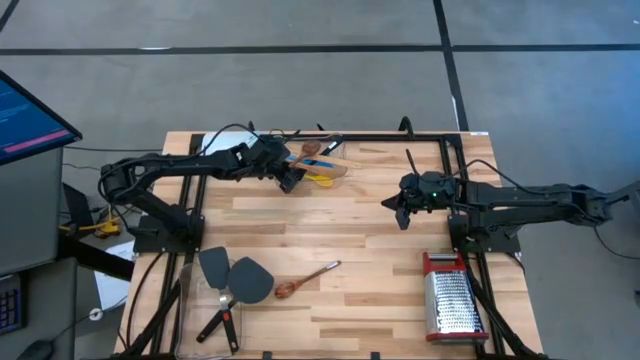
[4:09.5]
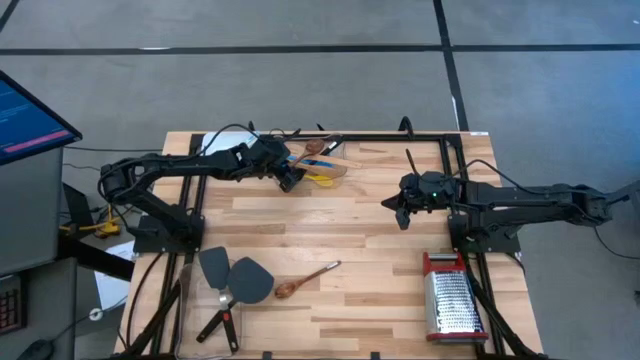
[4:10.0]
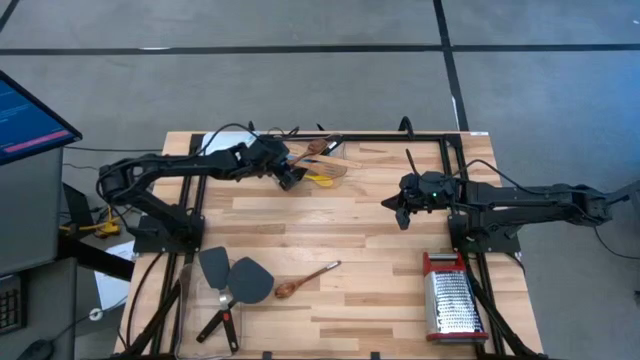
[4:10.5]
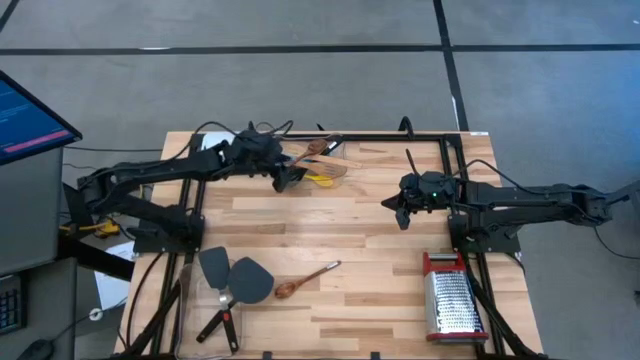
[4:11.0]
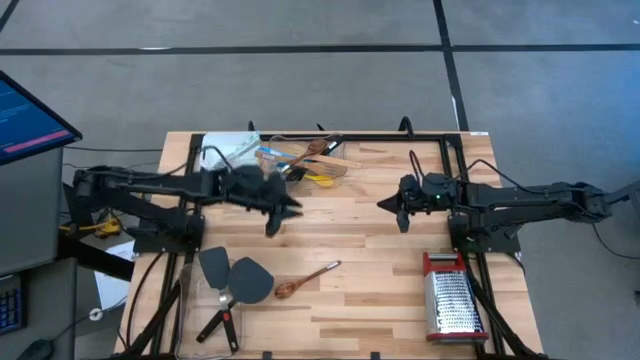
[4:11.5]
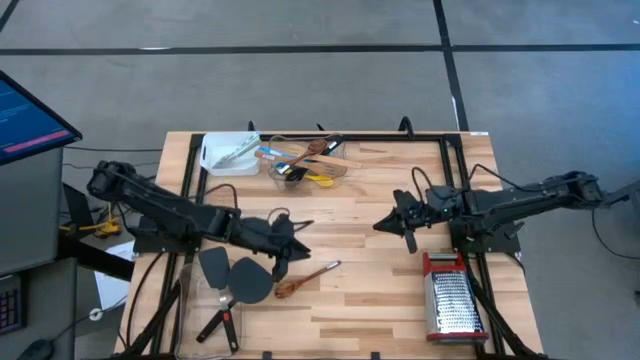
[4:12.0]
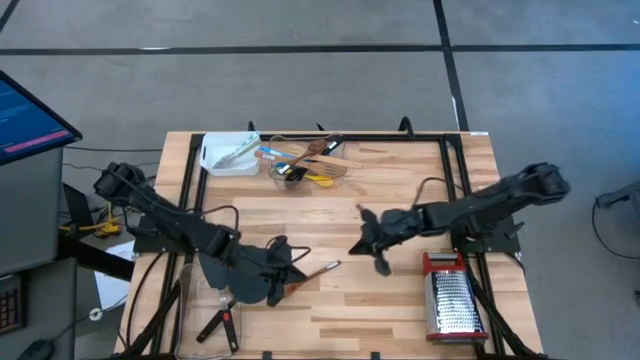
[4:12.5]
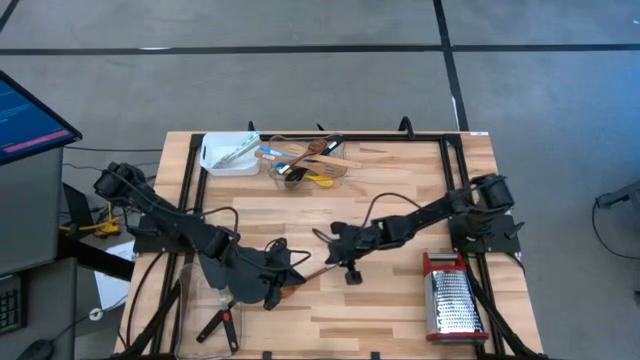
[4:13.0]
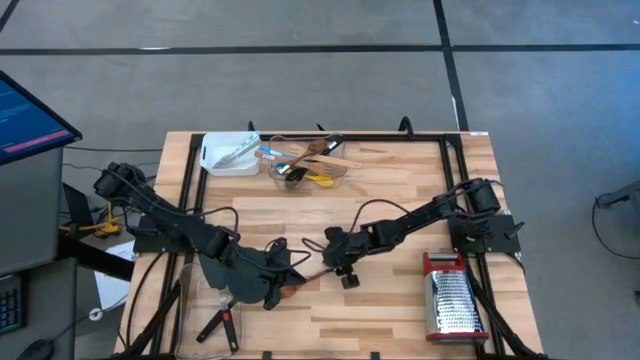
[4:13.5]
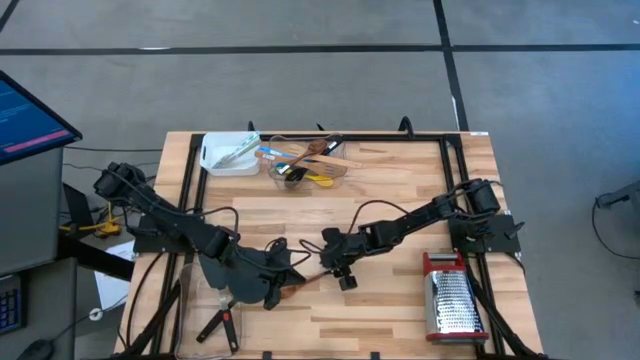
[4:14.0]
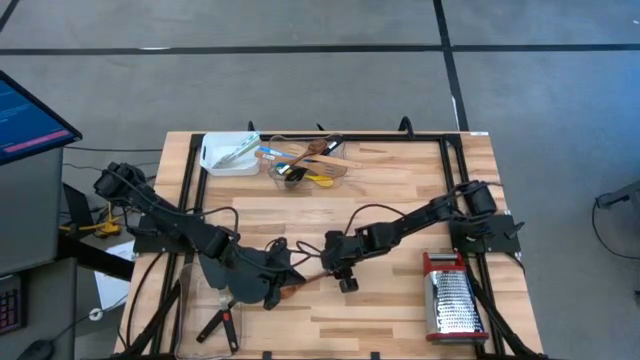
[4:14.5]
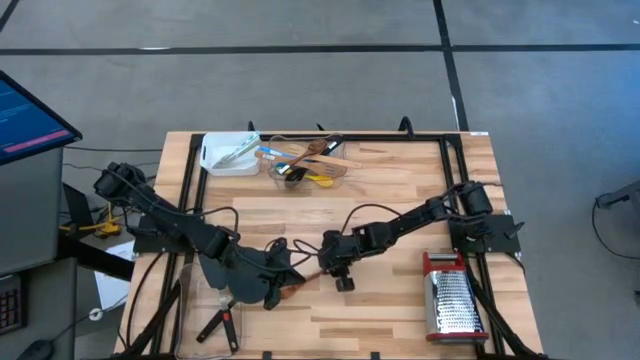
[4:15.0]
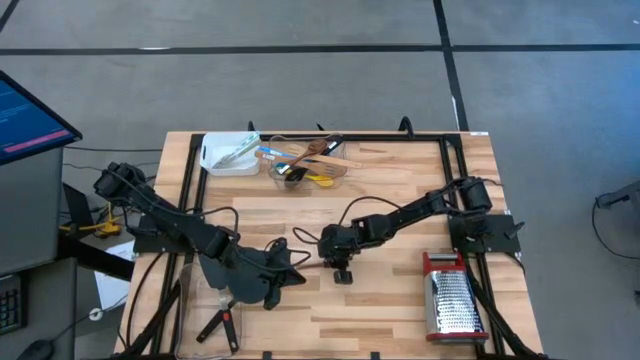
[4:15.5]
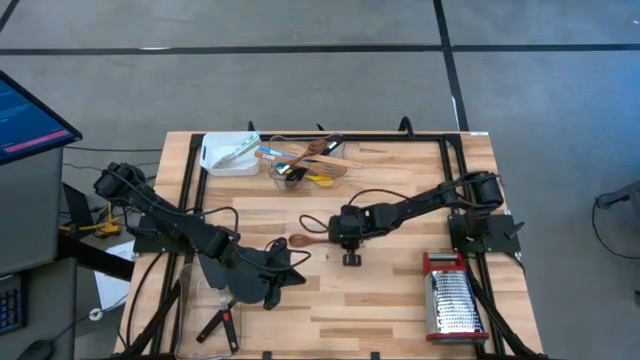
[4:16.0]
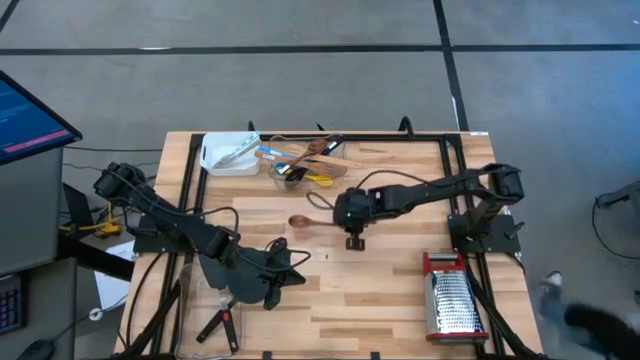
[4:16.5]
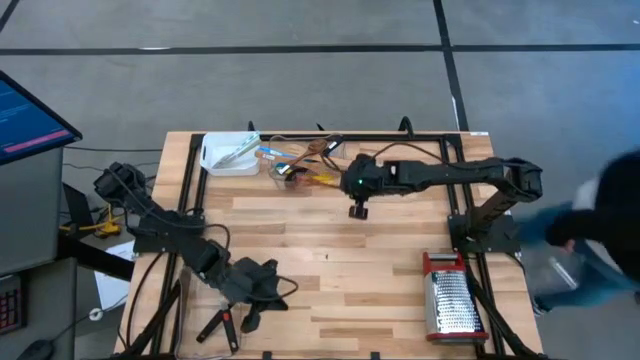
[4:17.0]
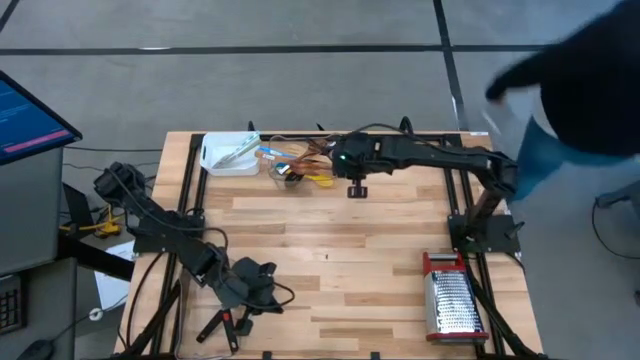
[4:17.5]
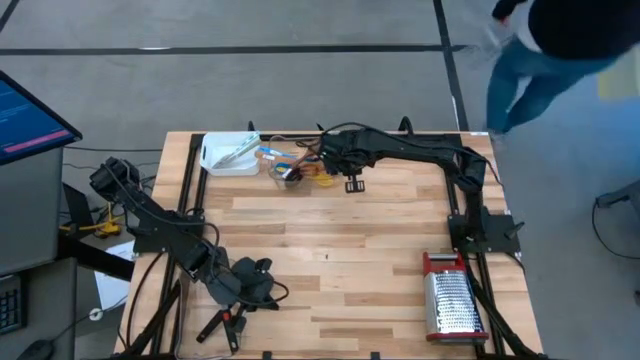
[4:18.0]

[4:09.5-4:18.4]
Task: Pick & Place Kitchen Items
Put the brown serving spoon into the top transparent bin

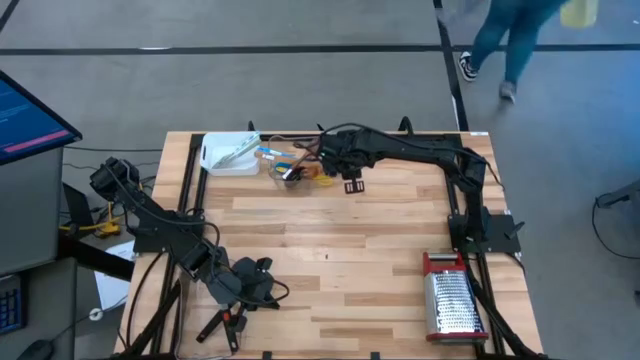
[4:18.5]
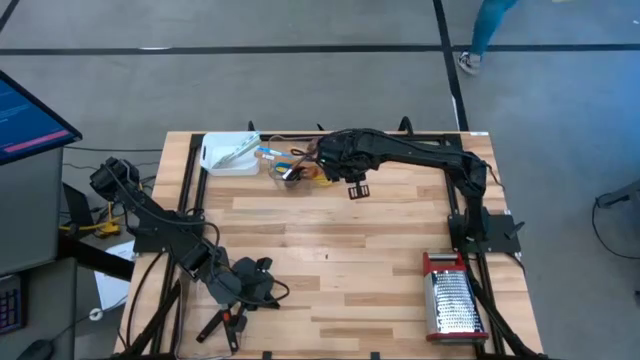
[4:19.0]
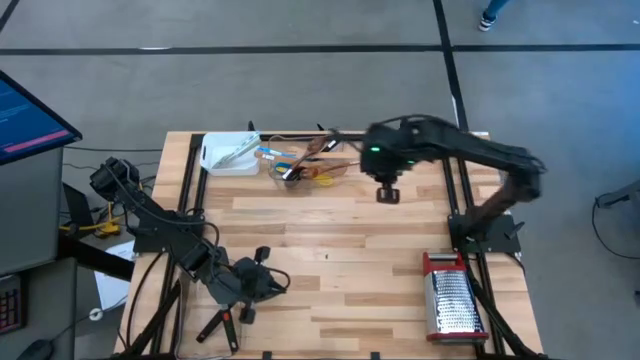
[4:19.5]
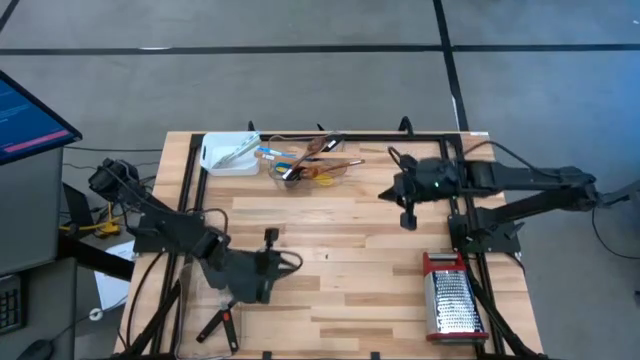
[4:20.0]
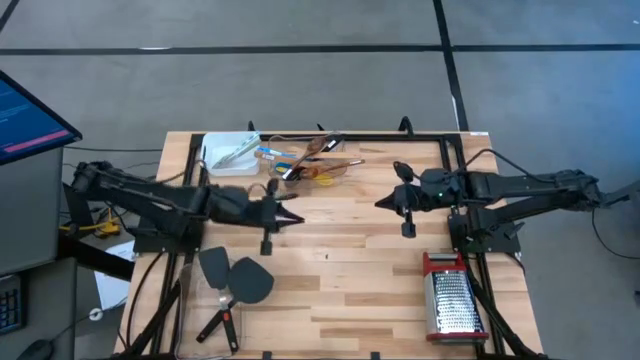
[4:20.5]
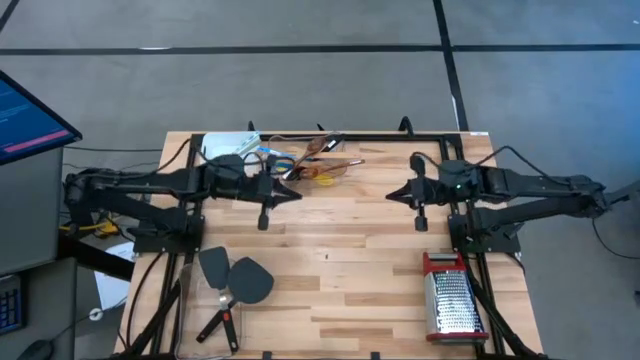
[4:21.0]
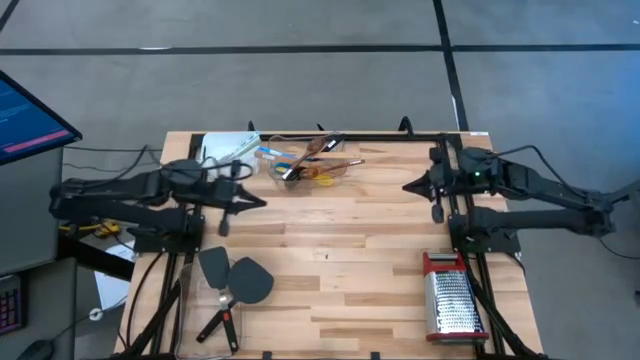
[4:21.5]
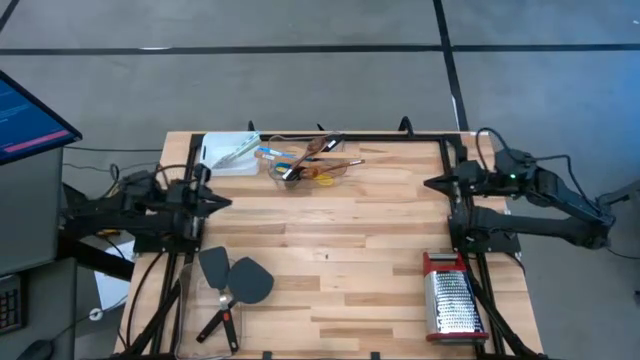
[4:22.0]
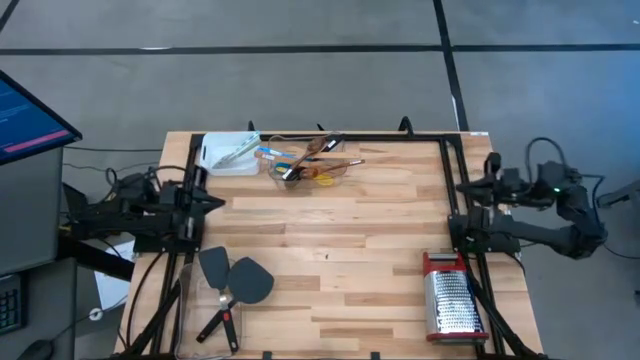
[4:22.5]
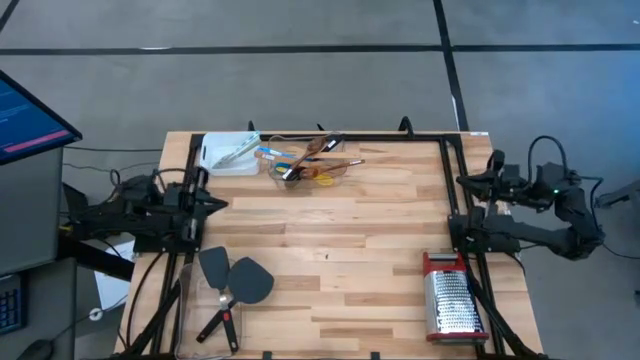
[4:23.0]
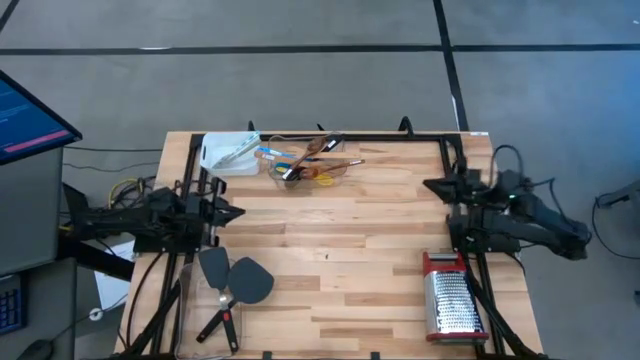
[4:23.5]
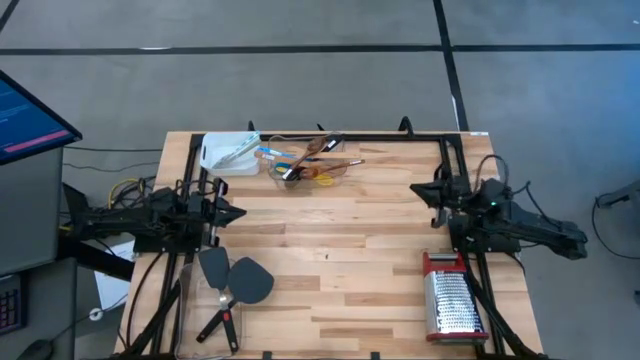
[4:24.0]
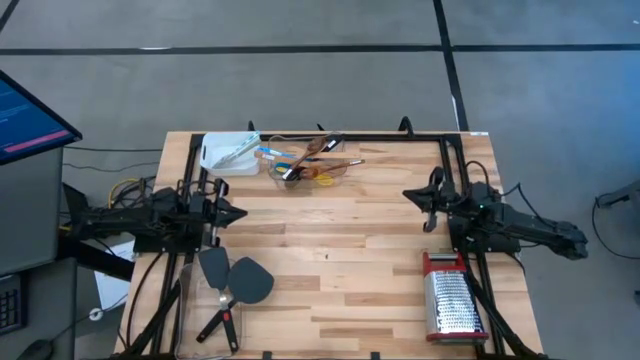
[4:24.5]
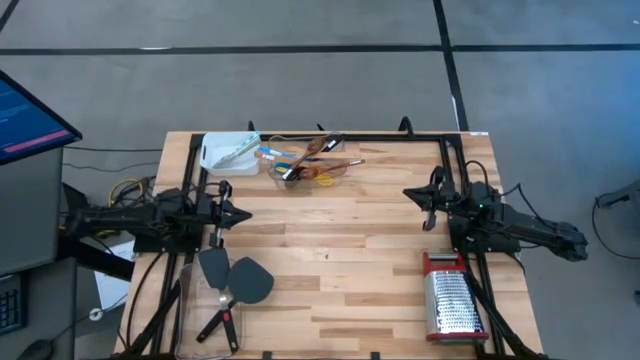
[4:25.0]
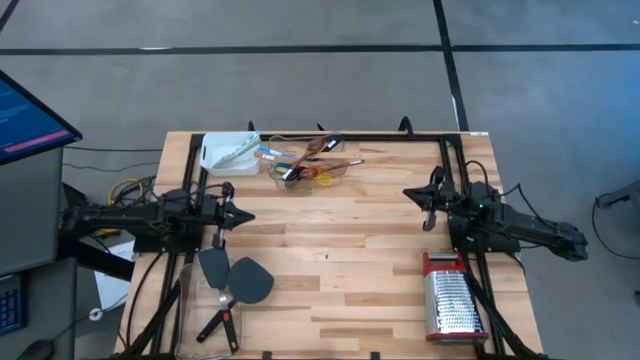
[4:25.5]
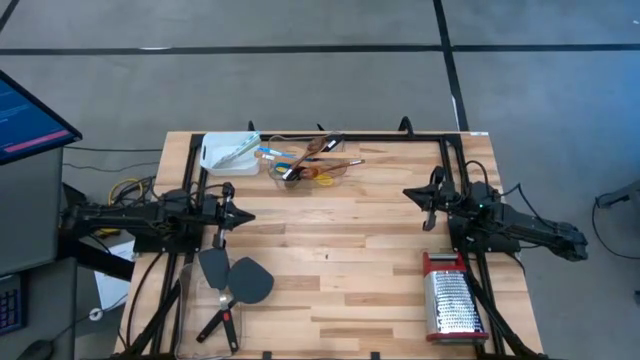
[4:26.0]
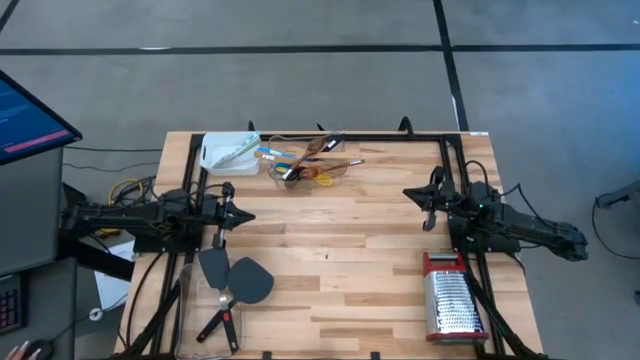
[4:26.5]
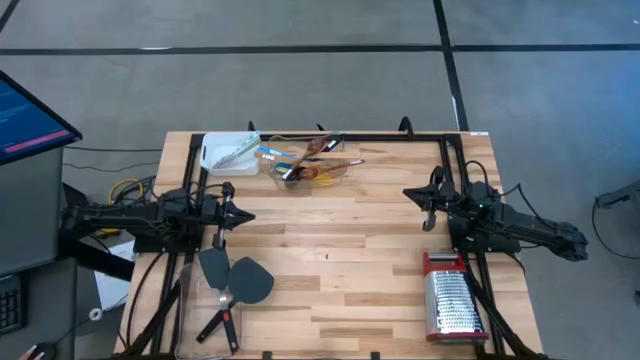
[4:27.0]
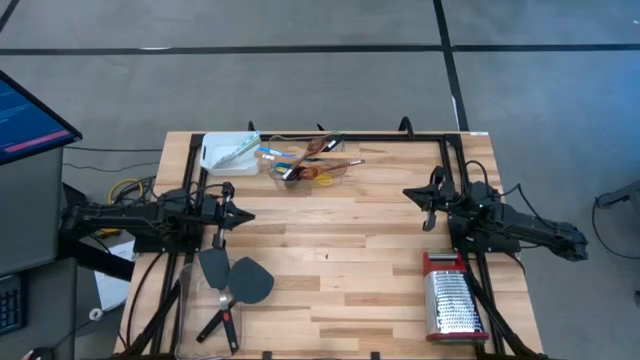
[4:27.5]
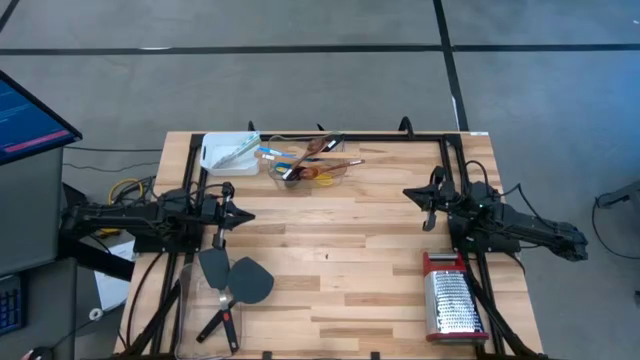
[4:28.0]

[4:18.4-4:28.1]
Return to Home Position

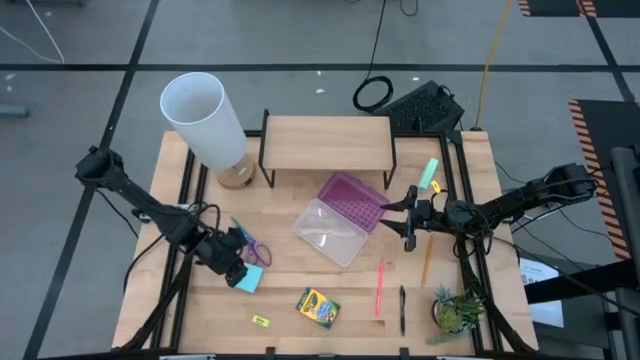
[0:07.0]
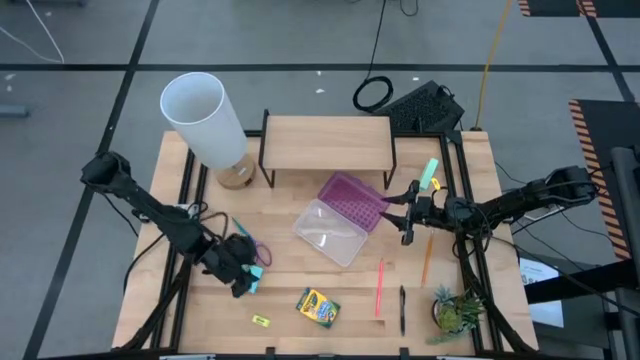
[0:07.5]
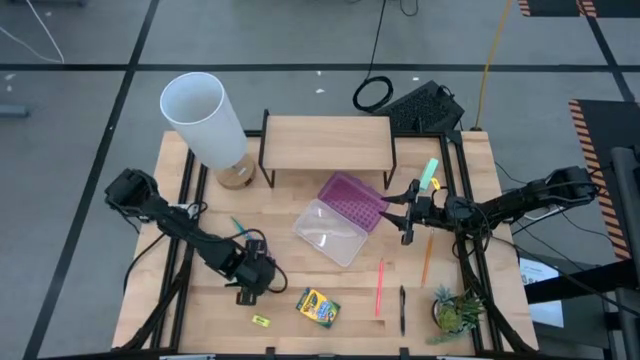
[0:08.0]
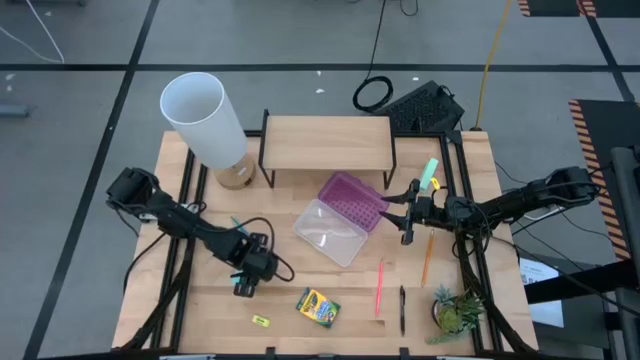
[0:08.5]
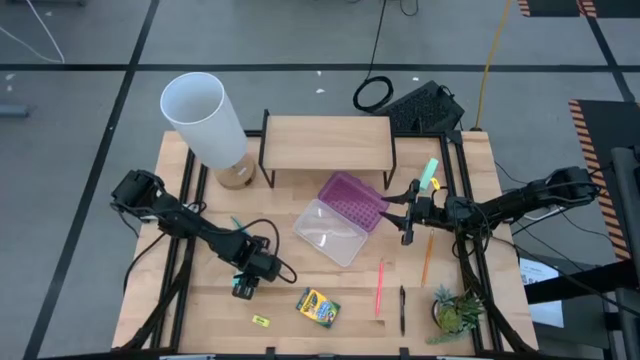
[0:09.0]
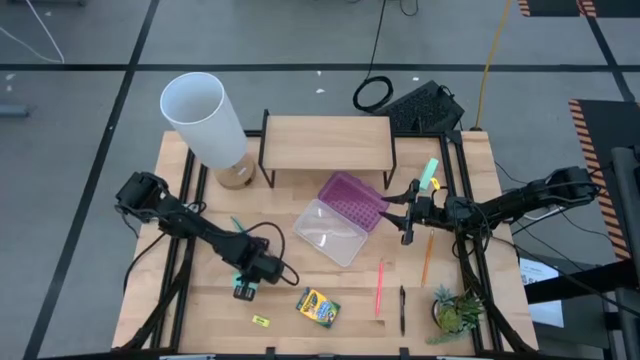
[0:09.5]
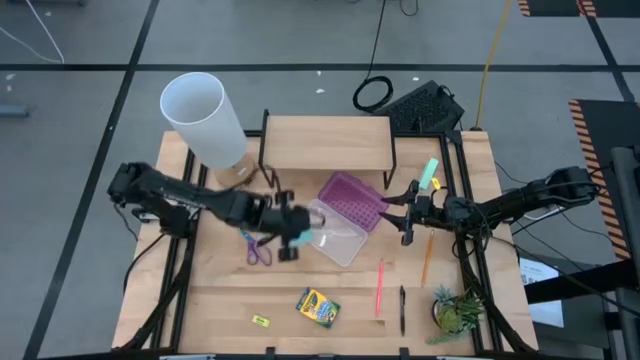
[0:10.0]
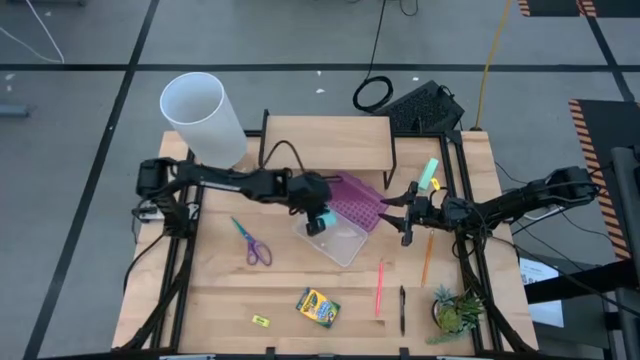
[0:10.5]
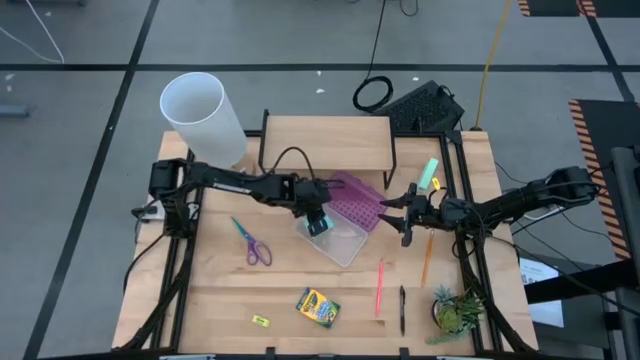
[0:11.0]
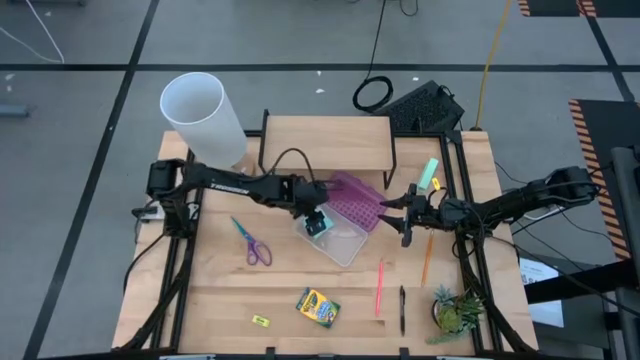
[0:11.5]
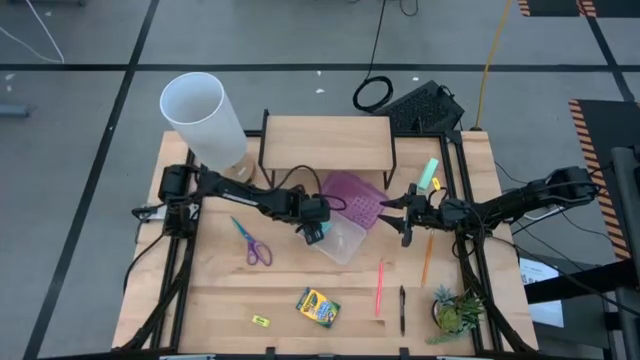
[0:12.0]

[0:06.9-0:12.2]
Task: Pack school essentials
Put the sticky note into the supply box
